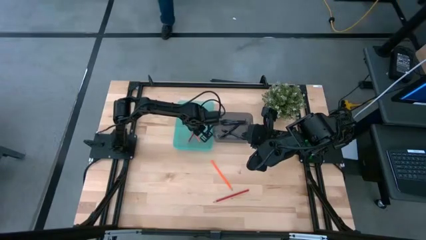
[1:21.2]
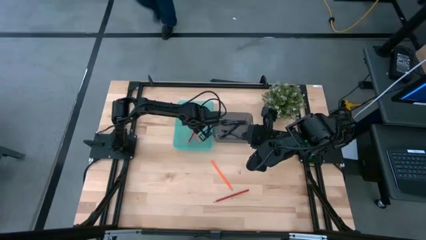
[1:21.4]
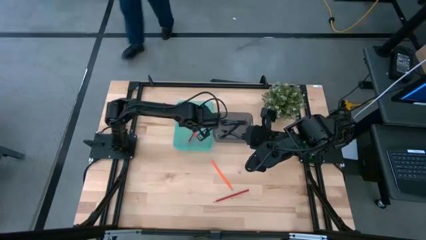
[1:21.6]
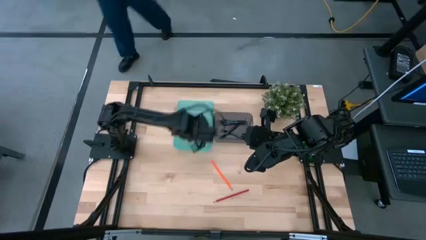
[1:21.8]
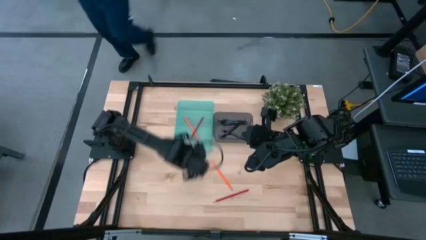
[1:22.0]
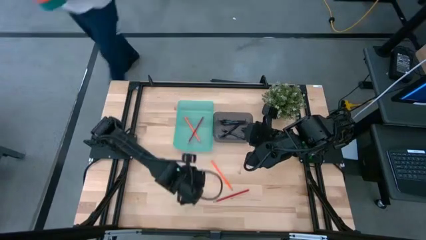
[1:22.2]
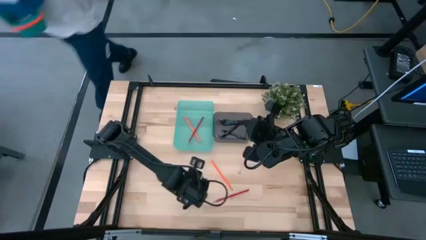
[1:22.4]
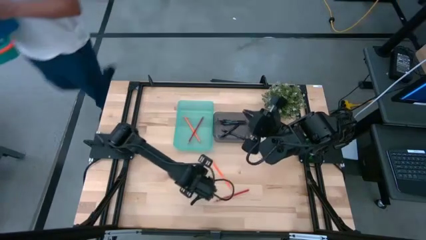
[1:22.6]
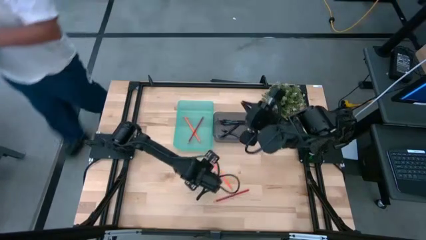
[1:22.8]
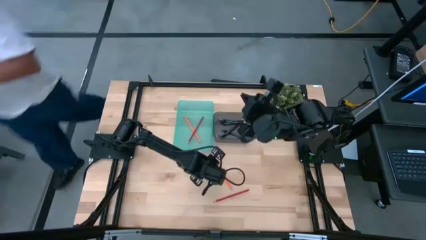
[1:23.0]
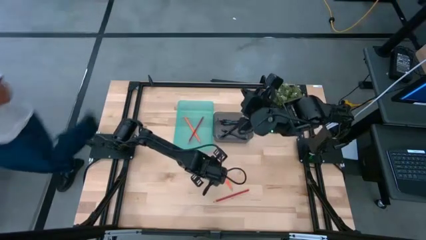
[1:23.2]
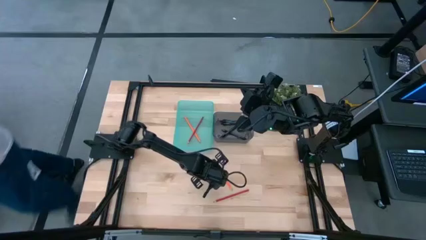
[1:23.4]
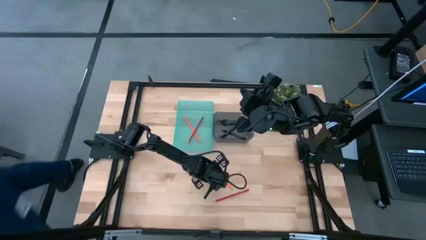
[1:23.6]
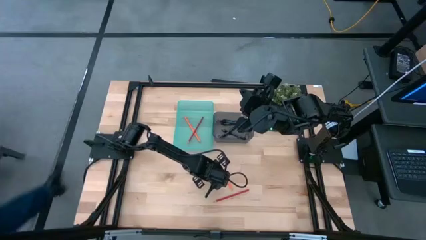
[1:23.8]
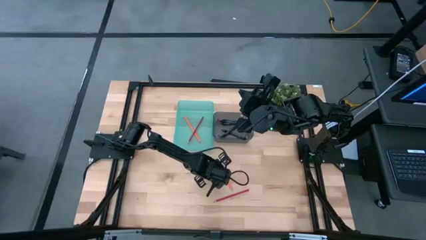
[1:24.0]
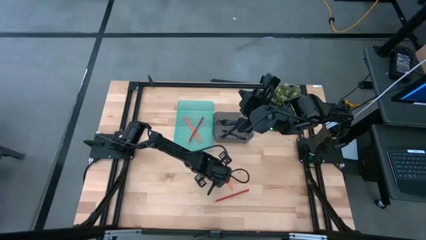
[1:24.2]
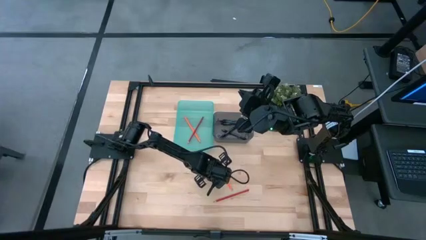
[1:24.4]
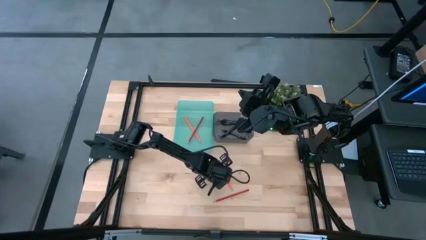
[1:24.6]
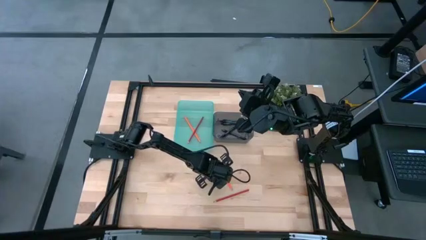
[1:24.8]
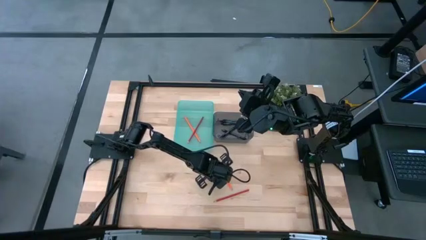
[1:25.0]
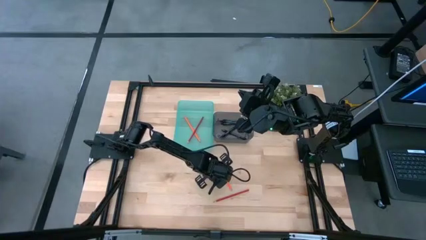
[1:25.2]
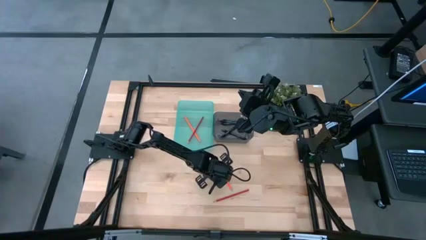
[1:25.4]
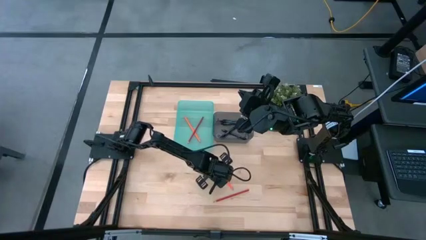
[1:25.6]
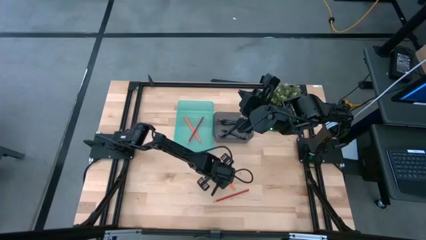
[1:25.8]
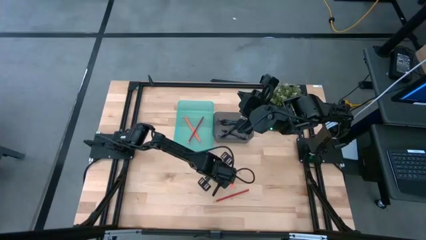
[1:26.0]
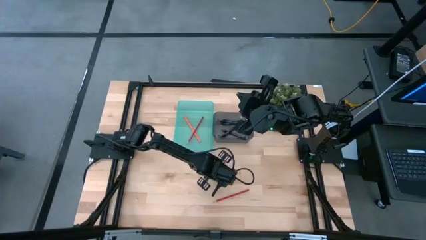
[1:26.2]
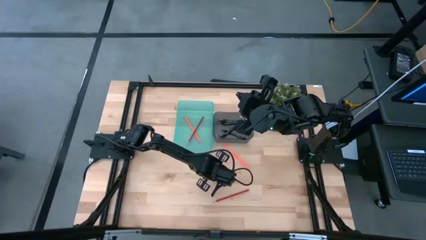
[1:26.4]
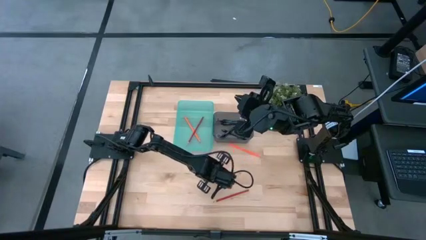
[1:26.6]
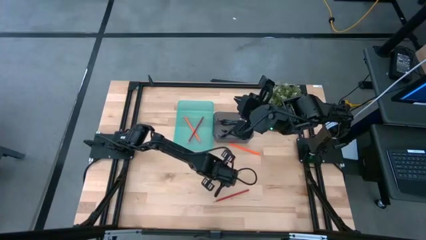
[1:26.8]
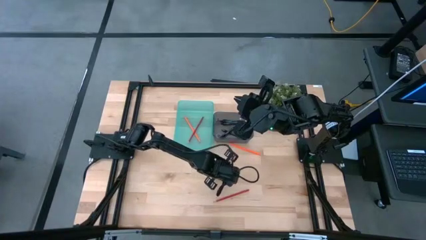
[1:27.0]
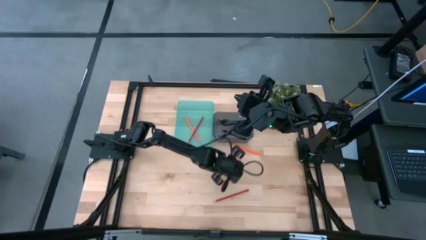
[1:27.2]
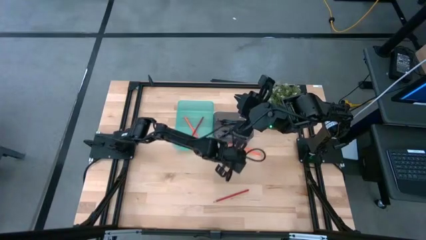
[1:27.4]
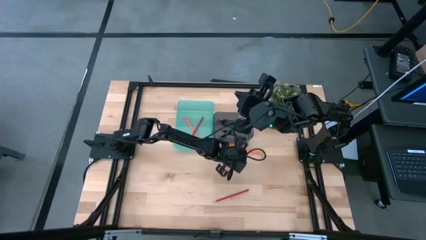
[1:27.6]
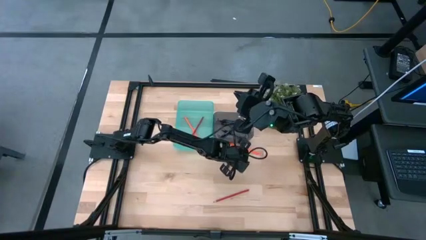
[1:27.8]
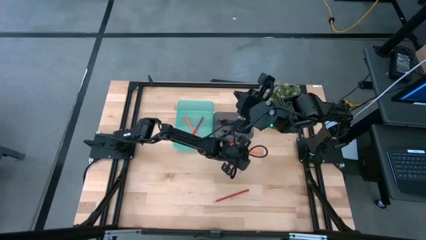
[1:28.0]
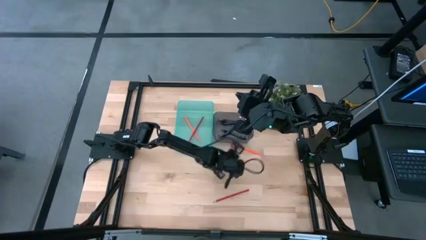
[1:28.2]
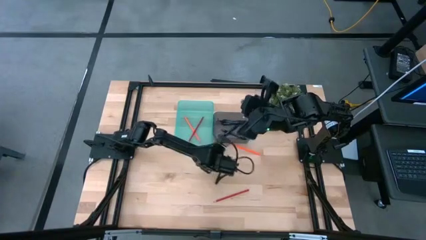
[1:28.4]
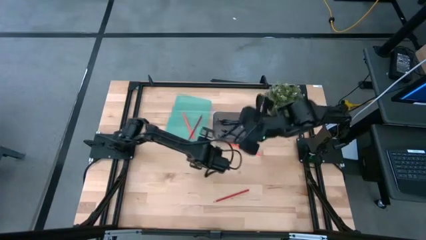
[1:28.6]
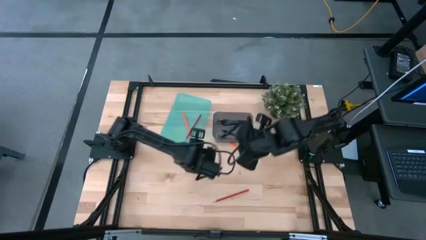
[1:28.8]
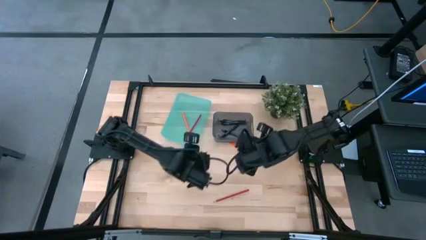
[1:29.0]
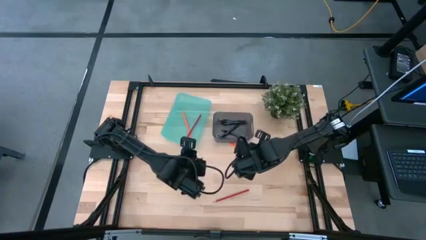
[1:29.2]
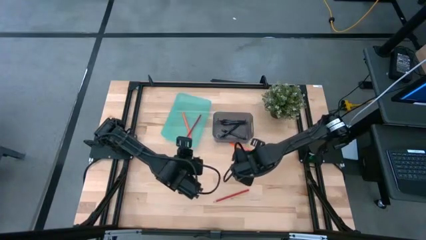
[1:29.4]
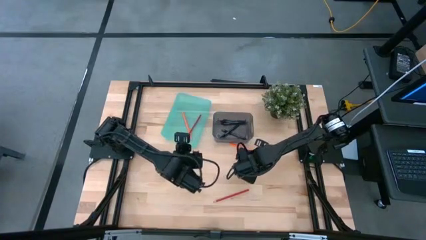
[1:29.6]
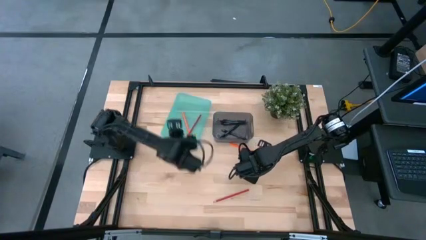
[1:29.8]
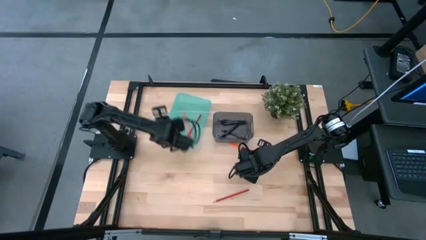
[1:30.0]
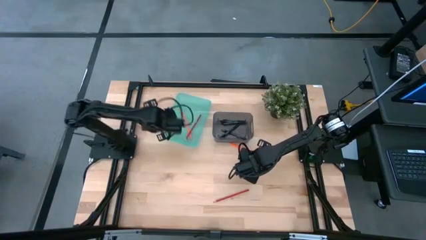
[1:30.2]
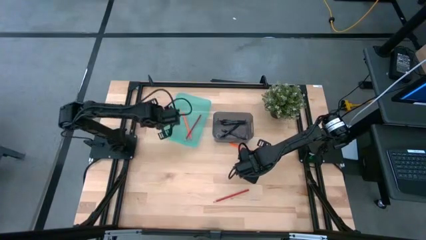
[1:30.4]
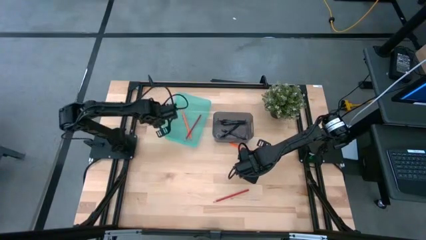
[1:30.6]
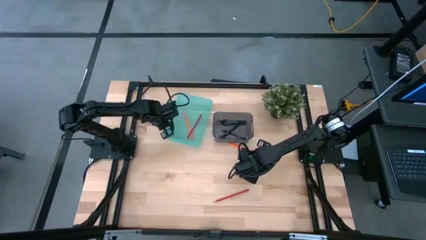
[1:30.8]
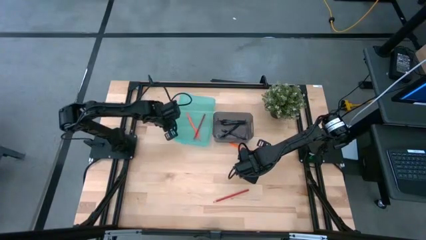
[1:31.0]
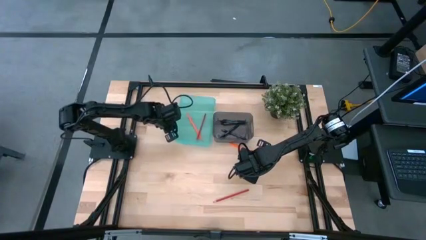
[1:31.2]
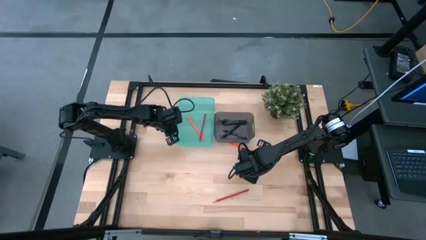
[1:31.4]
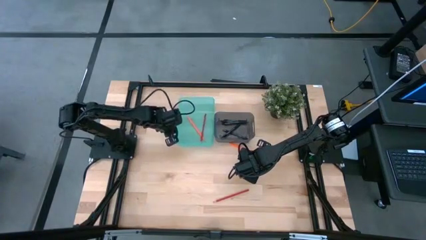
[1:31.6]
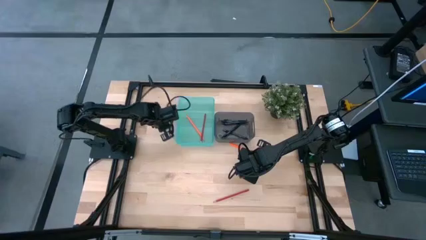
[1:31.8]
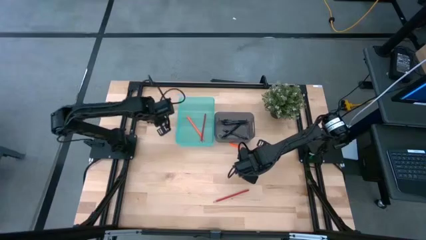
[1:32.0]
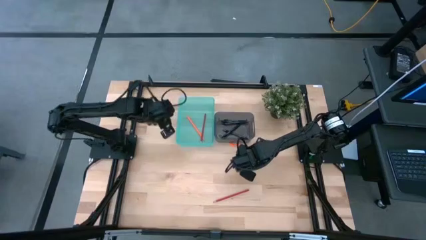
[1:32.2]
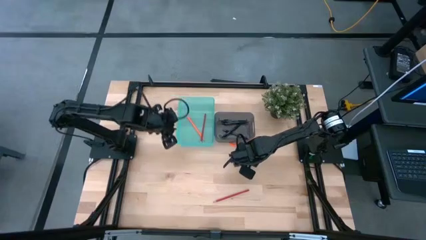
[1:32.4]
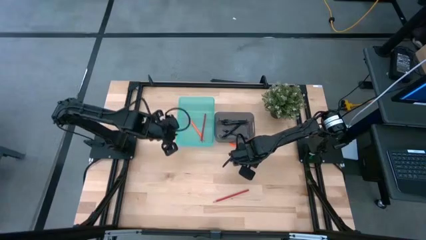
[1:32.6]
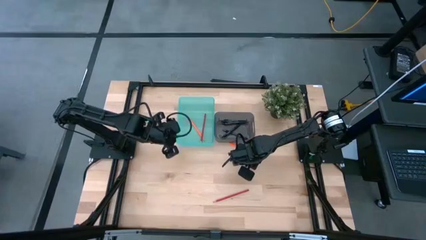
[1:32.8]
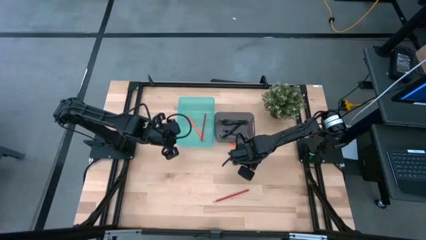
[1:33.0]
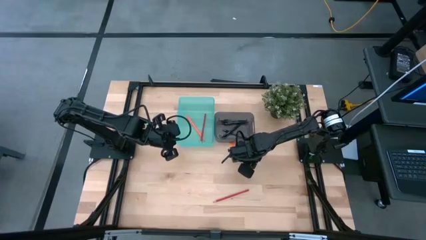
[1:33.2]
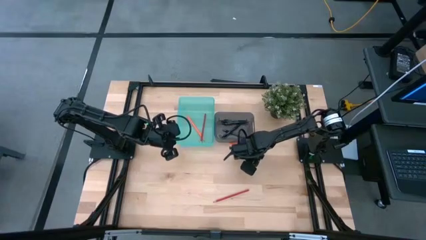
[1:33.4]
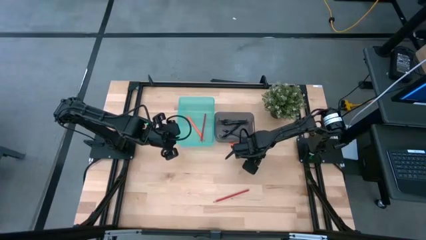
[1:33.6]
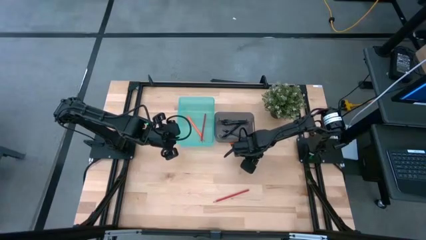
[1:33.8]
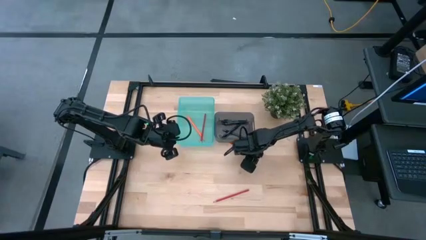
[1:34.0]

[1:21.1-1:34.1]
Task: Sort pens & pencils
Put the orange colored pencil into the green bin
